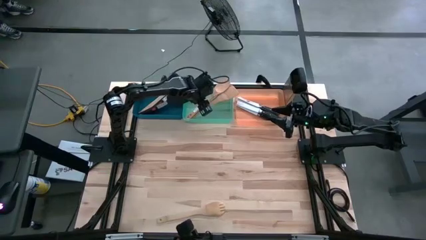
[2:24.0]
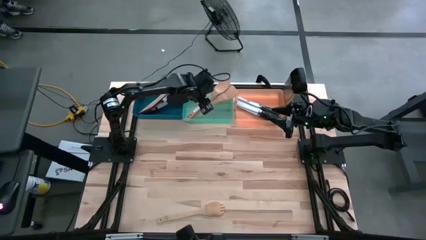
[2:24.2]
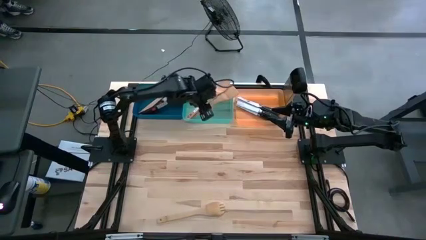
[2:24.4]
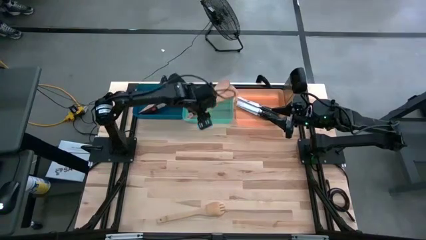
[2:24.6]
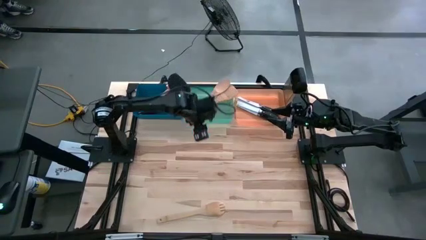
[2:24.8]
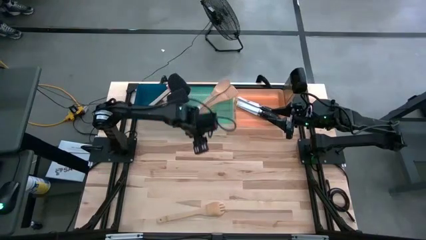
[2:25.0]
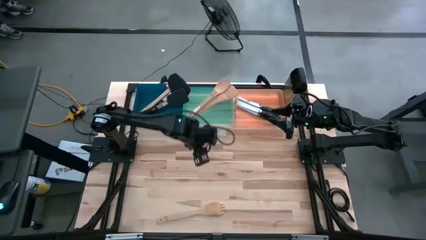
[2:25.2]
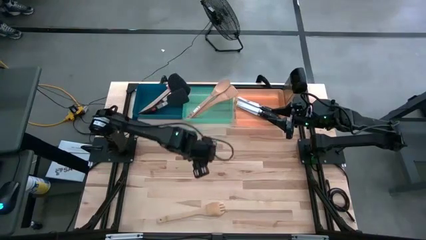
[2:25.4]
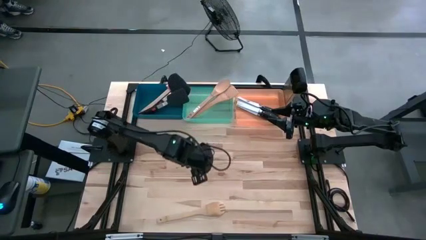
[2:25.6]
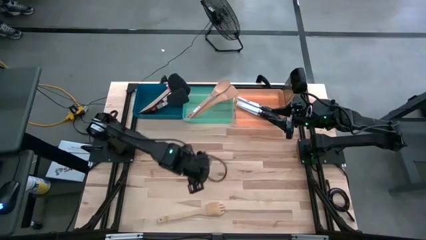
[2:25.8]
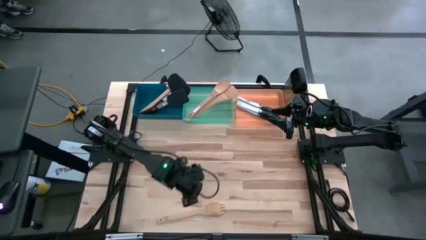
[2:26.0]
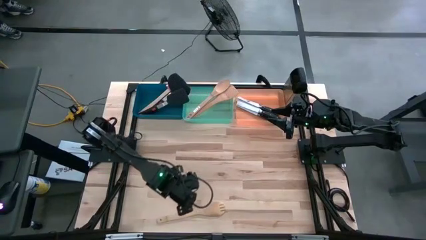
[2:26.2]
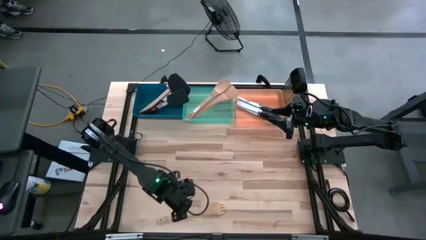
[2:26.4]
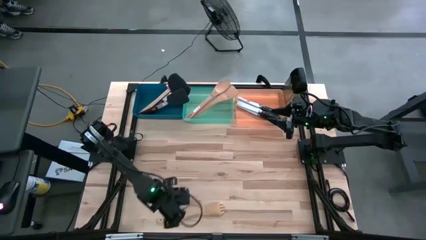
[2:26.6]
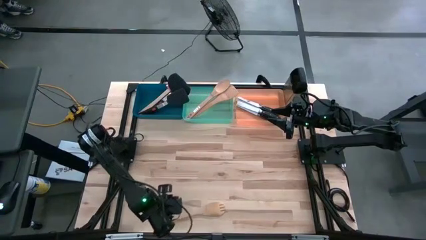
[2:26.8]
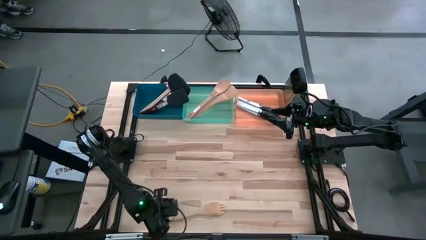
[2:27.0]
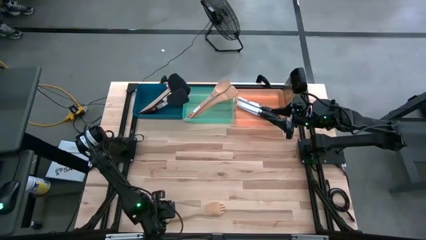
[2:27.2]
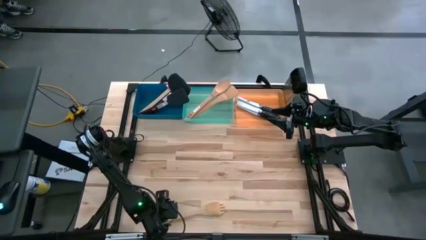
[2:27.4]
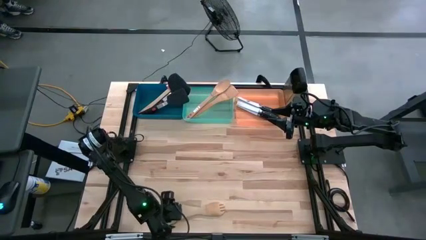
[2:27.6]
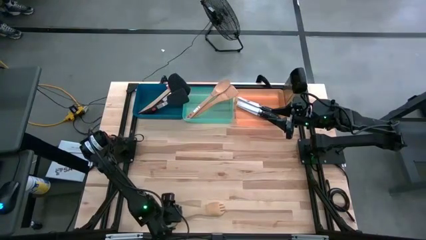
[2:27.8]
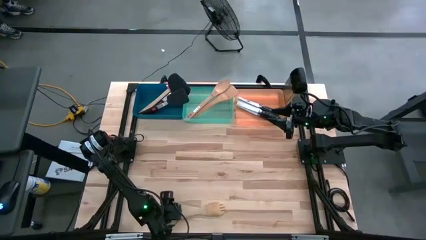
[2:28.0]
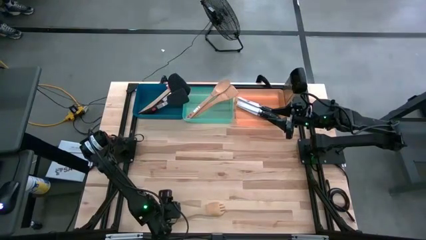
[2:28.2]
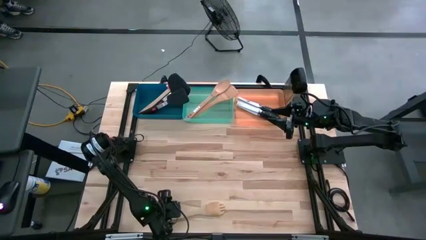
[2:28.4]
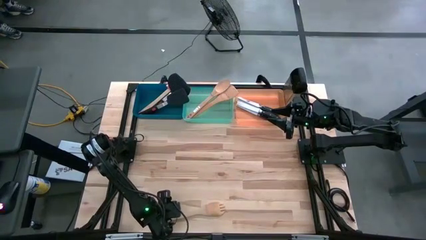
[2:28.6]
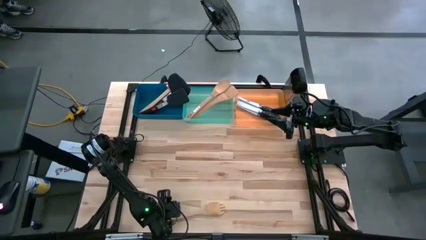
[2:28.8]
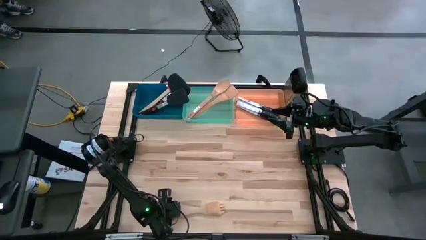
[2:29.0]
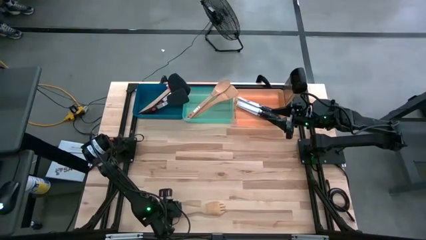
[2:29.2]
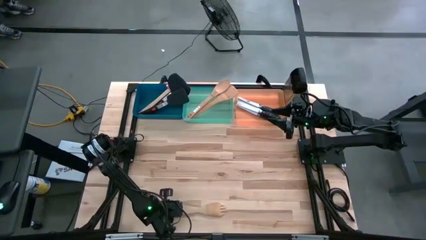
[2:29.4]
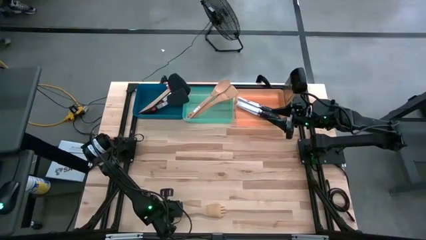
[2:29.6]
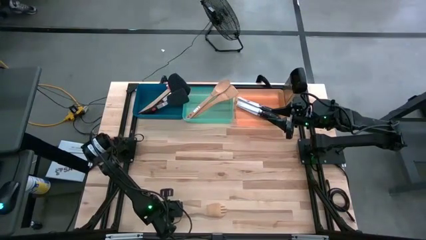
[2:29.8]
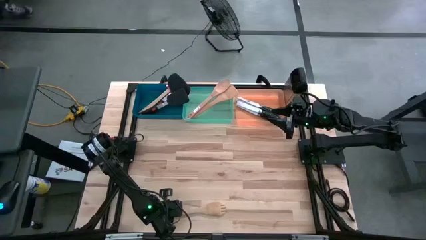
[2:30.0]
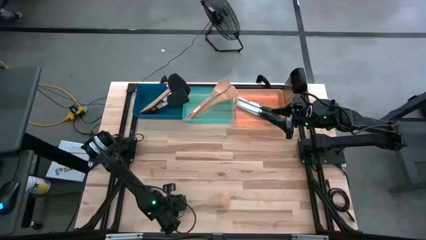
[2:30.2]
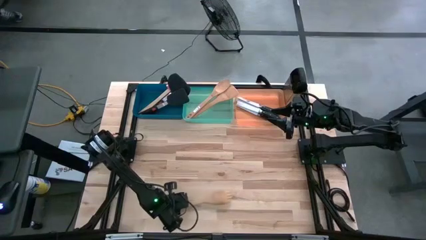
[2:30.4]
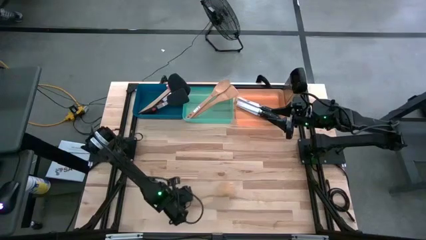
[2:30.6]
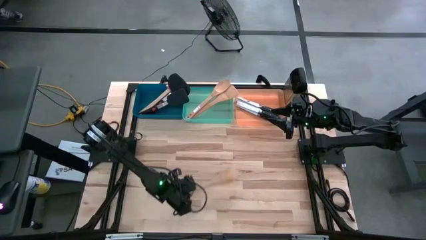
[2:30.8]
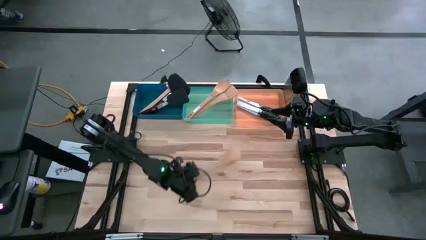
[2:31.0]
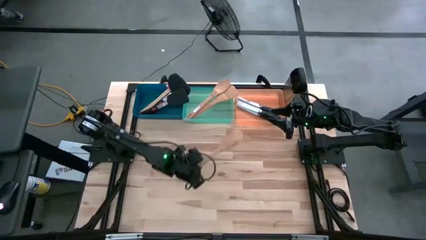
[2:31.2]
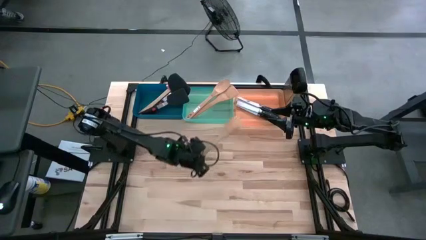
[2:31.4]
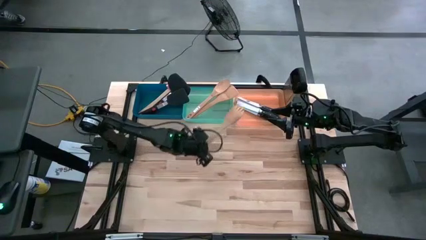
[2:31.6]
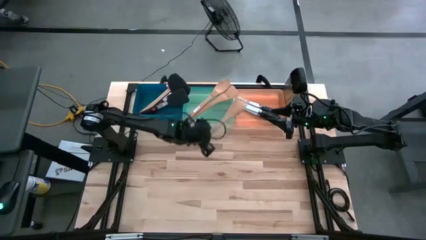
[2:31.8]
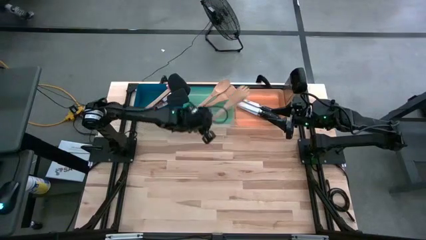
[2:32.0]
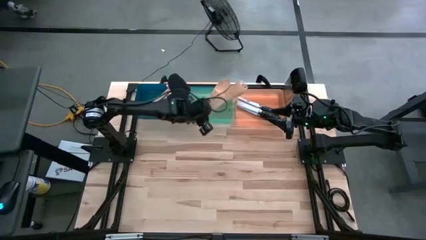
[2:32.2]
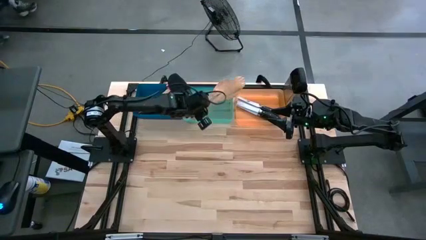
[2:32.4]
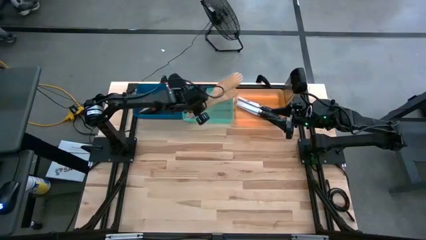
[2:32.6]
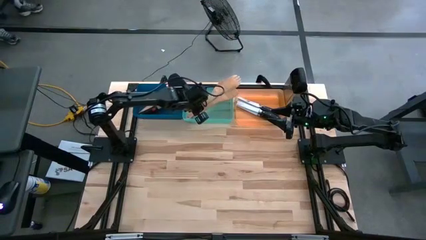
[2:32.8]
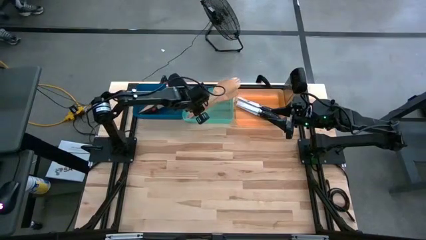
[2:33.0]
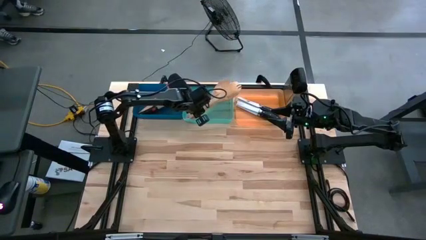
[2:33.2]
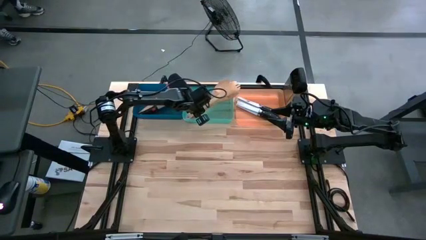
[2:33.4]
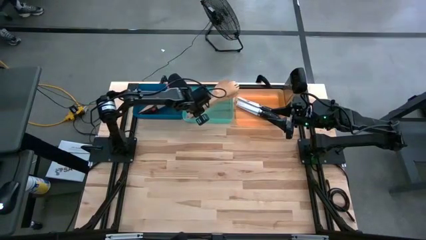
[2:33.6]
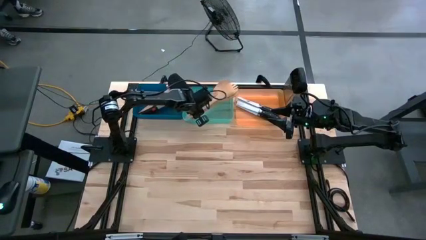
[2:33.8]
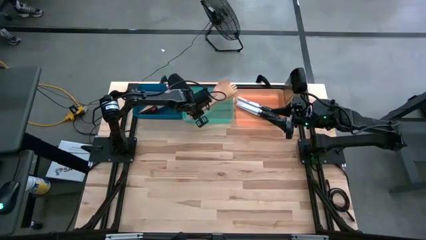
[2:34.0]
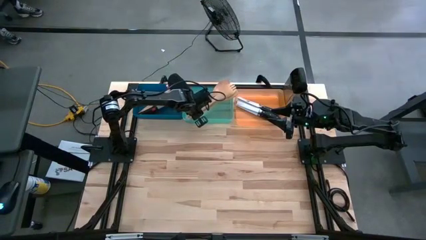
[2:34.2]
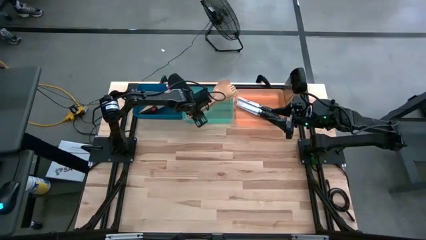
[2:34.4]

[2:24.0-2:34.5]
Task: Pick & Place Kitchen Items
Put the serving spoon into the green bin

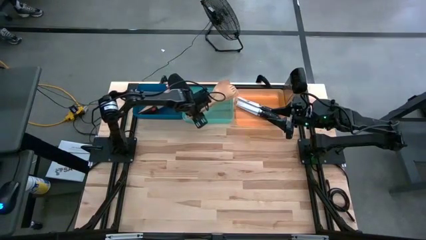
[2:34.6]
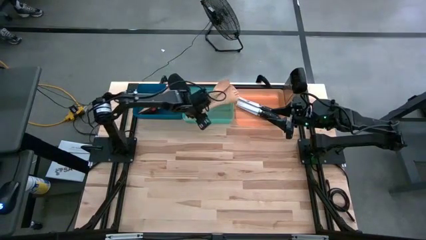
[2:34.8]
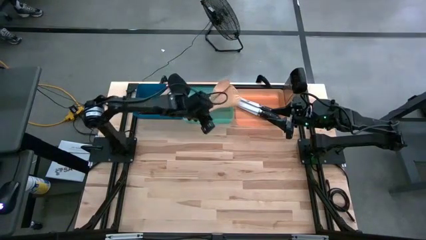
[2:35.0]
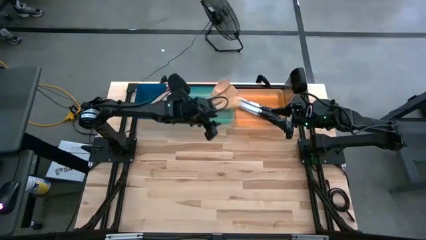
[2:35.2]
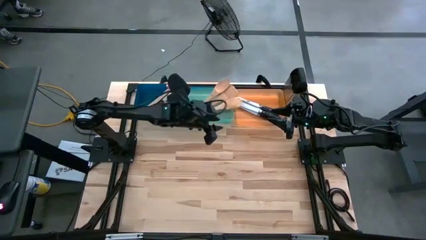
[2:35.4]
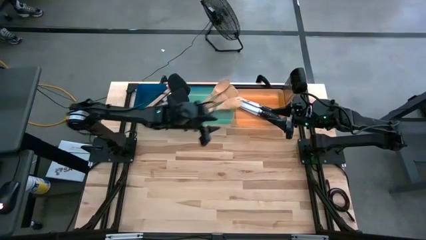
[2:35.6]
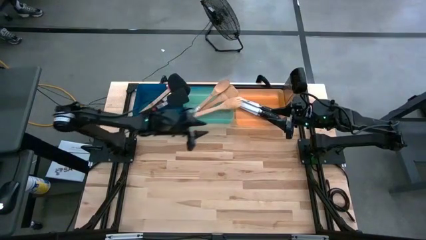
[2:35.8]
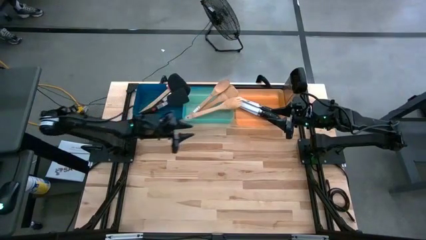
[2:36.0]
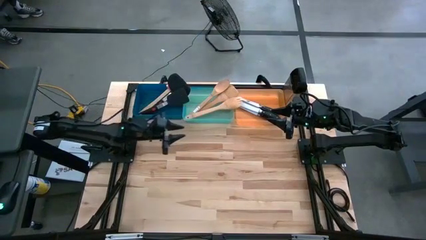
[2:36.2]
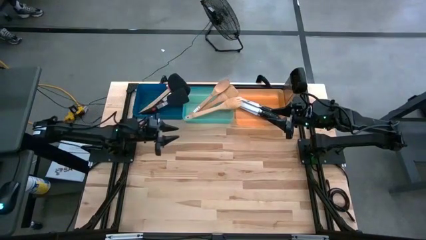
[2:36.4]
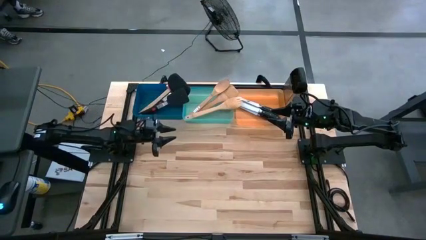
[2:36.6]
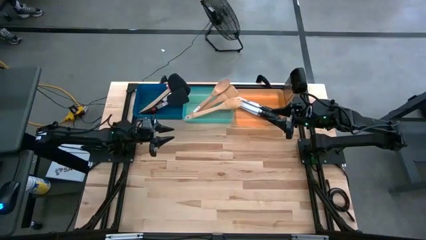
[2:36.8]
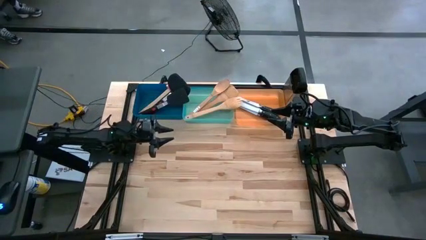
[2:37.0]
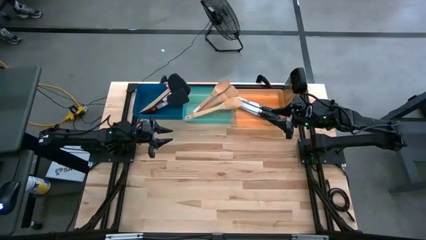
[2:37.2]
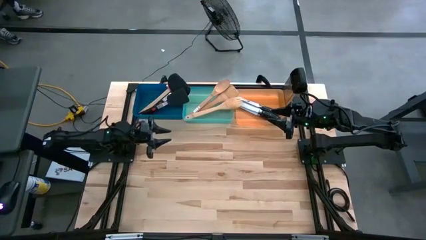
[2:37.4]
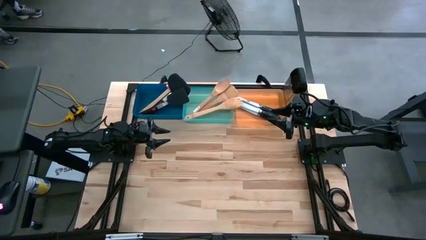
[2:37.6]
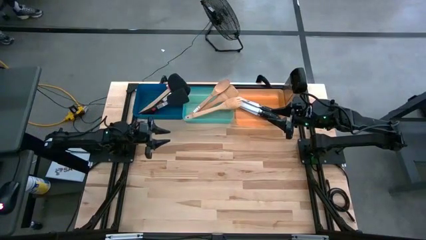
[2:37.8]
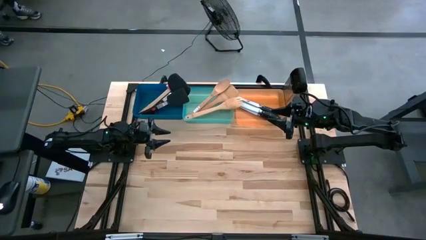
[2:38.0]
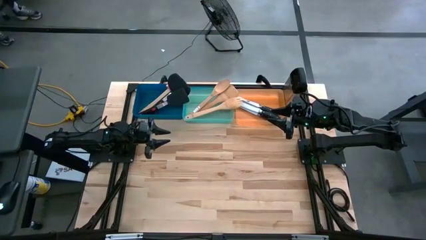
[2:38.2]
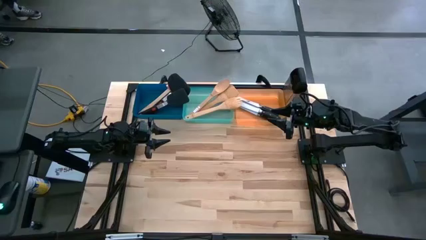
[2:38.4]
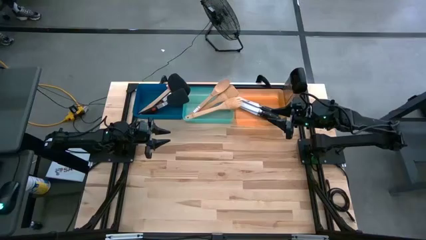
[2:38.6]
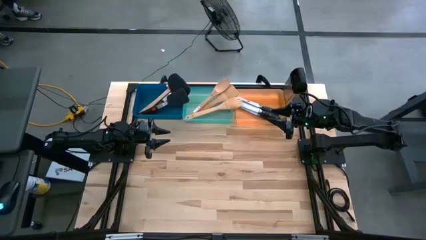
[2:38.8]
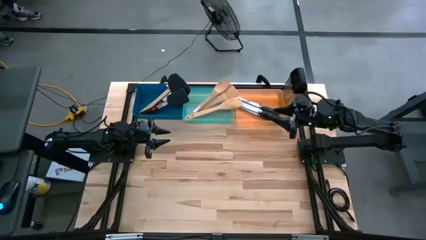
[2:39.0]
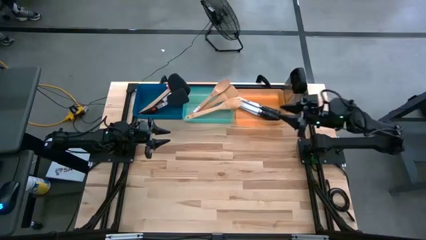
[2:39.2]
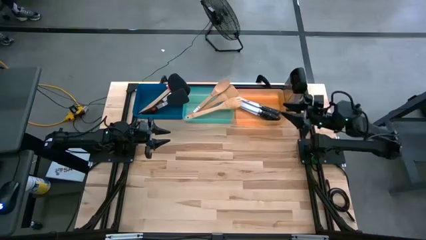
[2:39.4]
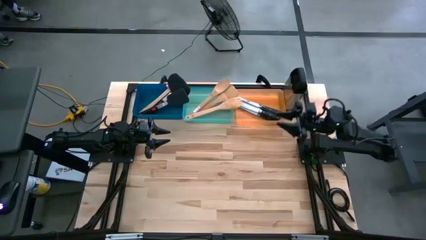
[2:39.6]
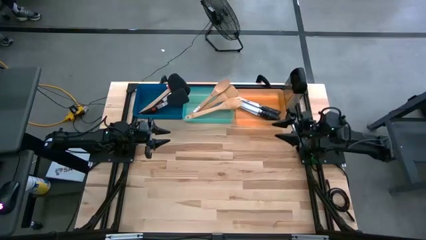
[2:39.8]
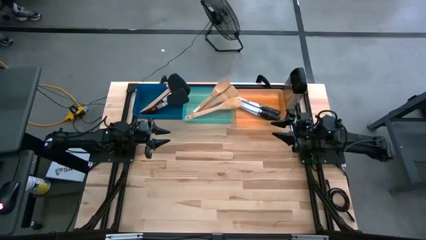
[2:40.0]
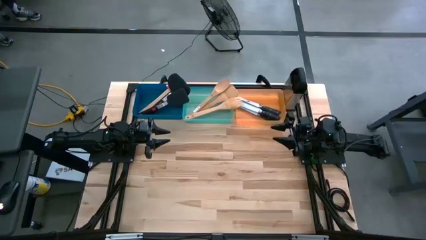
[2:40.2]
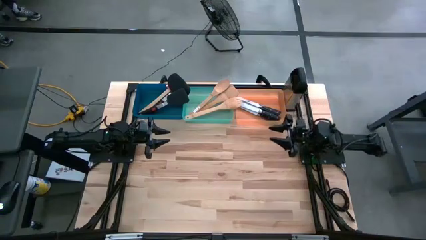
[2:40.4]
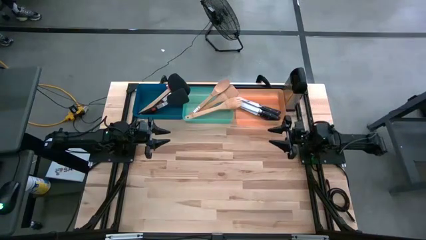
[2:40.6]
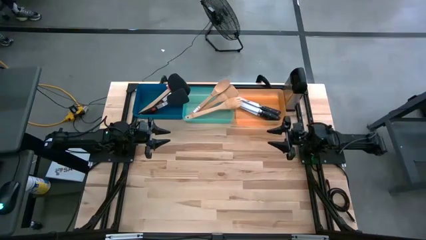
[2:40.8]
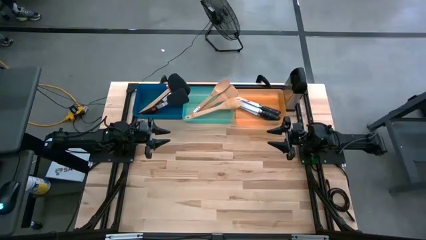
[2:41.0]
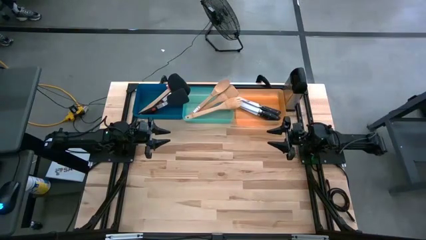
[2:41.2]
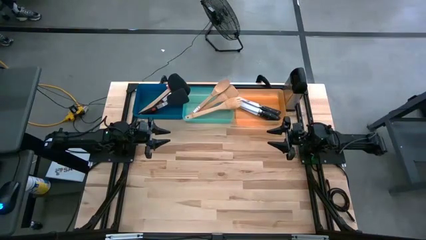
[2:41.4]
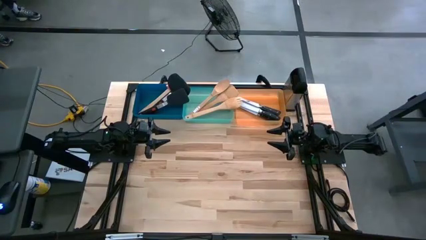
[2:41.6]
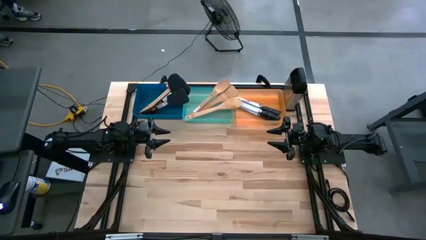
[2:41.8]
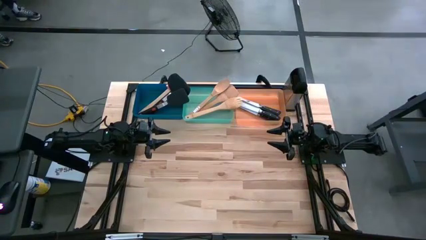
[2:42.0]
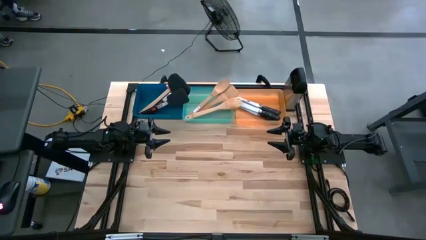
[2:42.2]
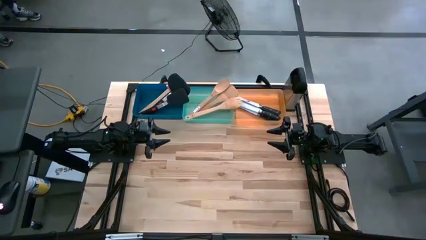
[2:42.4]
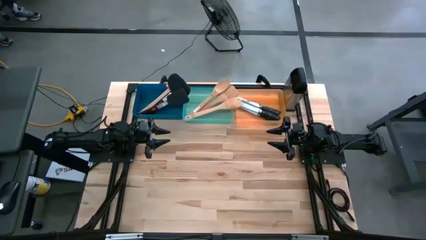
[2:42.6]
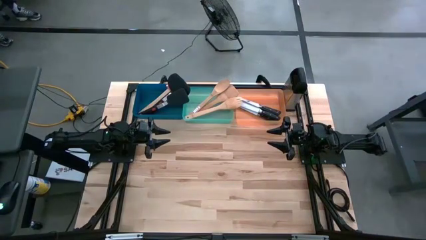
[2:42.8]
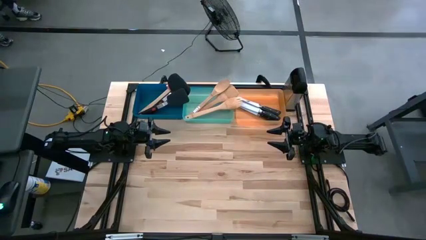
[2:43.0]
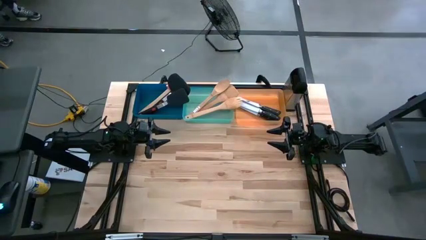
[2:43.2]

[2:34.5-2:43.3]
Return to Home Position
